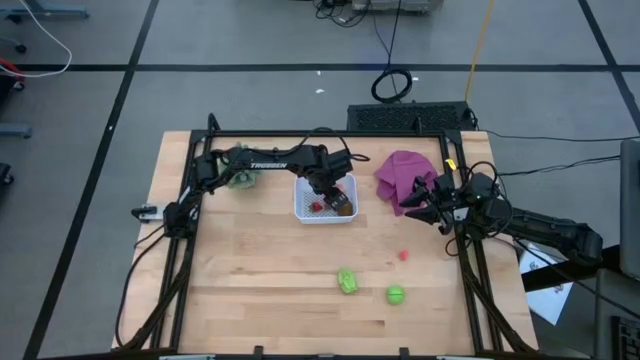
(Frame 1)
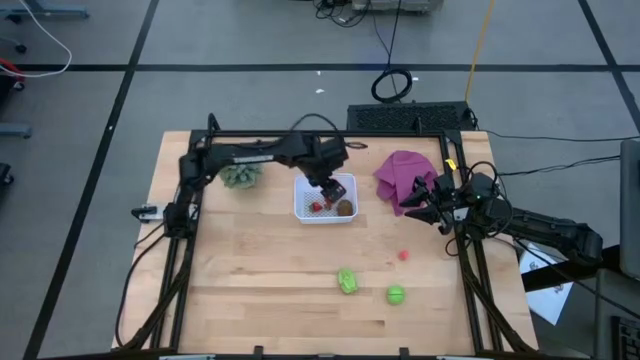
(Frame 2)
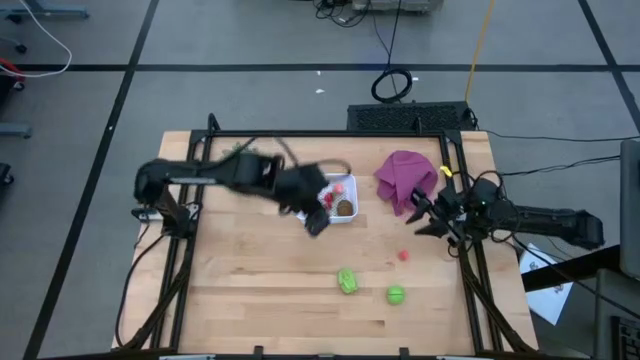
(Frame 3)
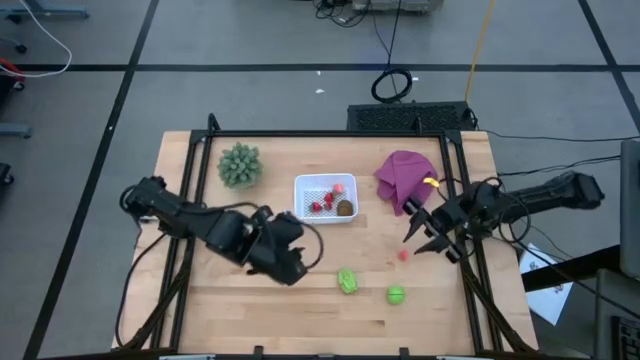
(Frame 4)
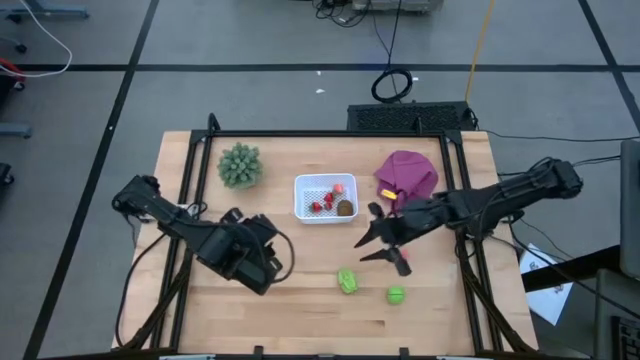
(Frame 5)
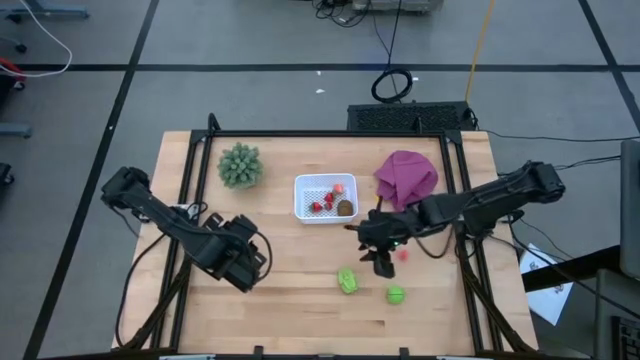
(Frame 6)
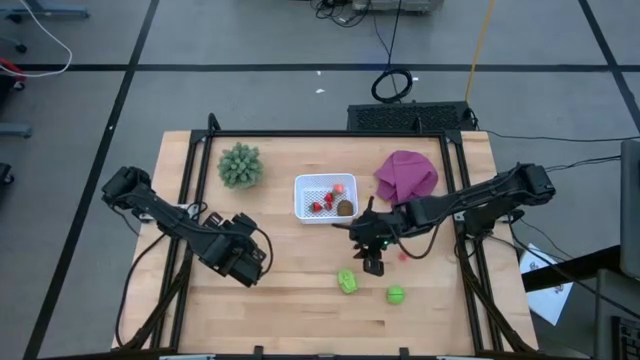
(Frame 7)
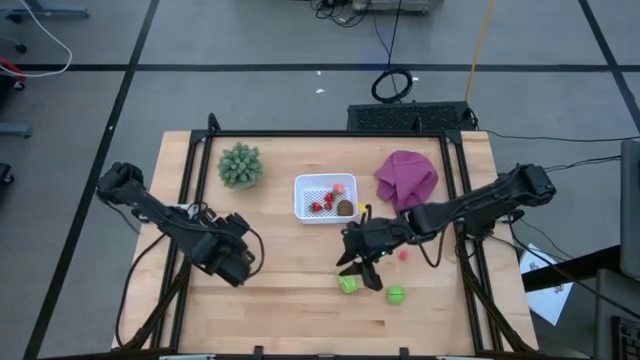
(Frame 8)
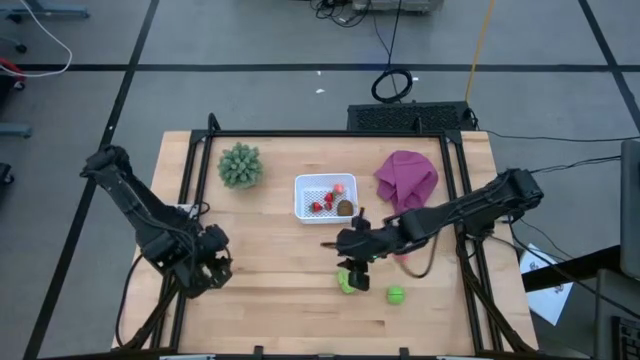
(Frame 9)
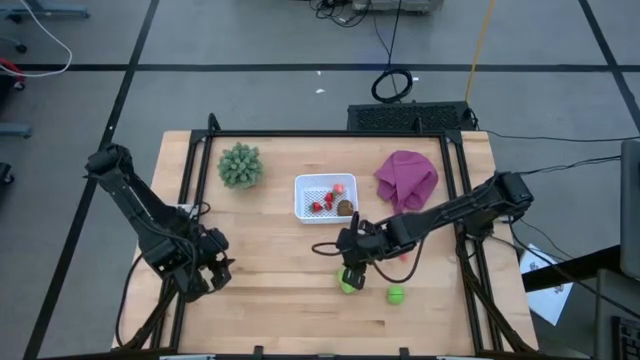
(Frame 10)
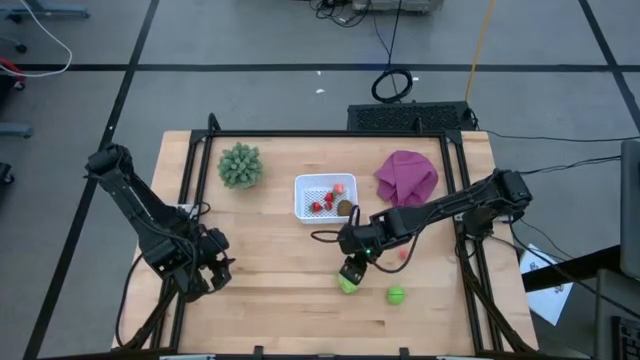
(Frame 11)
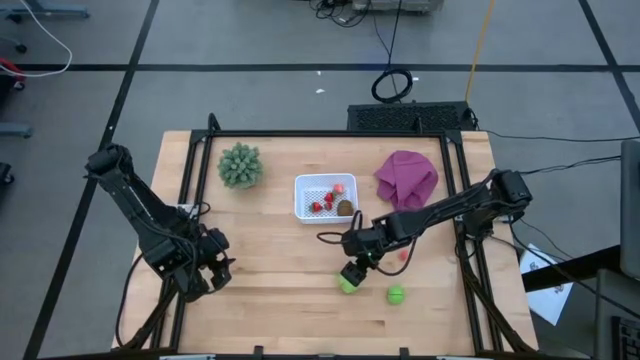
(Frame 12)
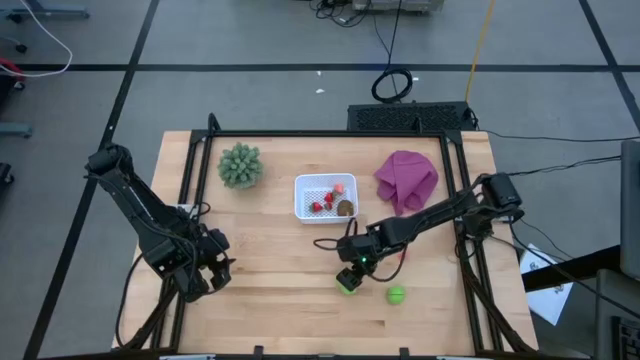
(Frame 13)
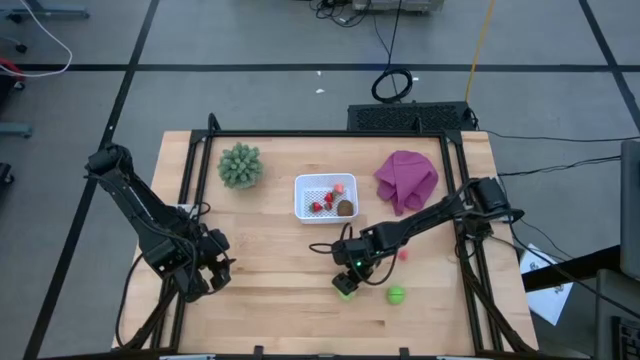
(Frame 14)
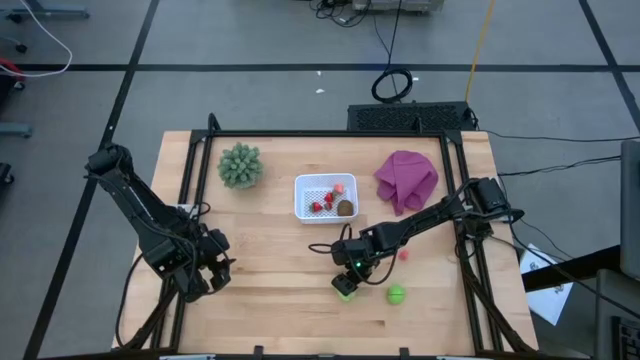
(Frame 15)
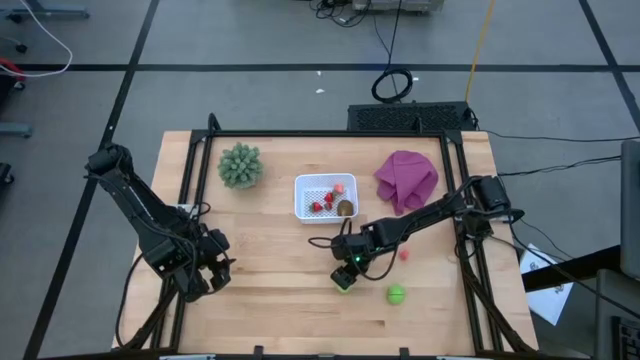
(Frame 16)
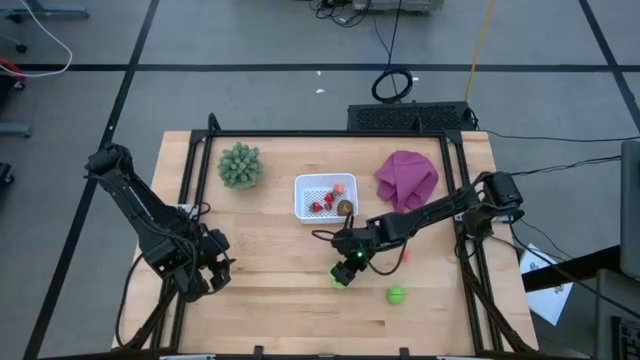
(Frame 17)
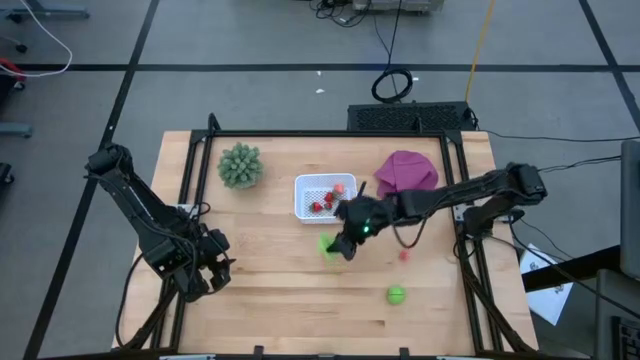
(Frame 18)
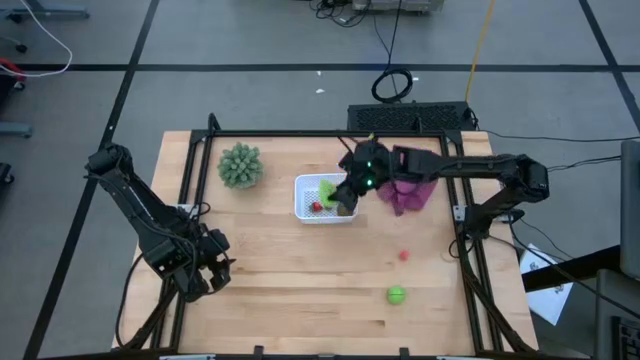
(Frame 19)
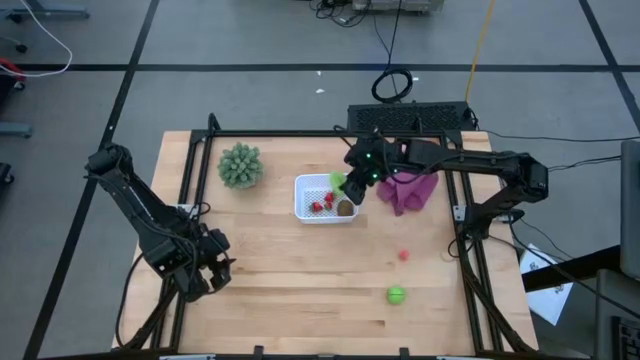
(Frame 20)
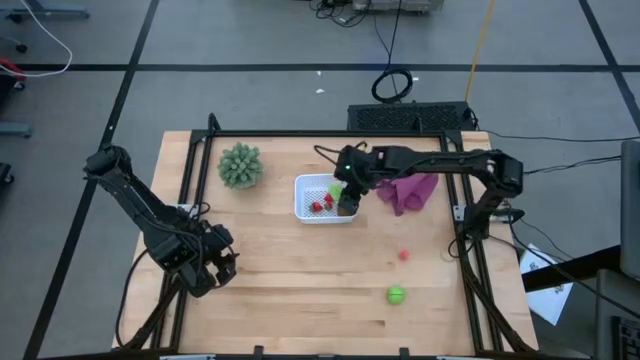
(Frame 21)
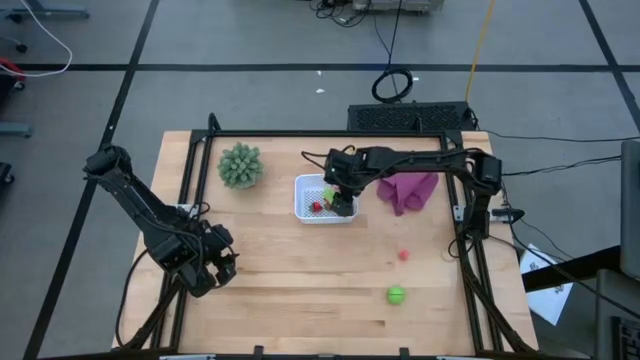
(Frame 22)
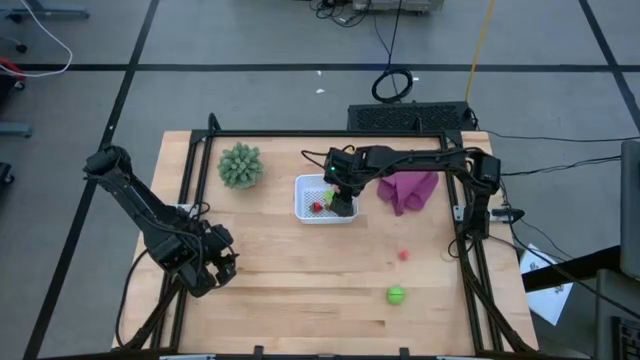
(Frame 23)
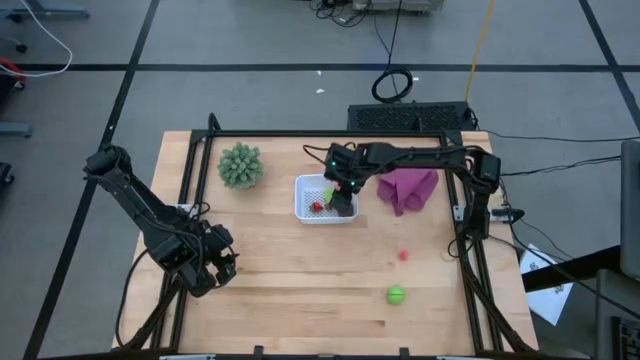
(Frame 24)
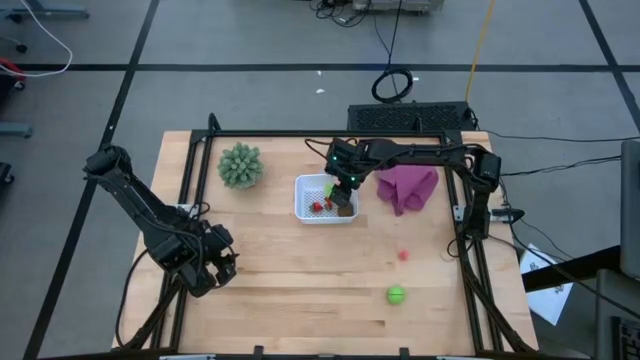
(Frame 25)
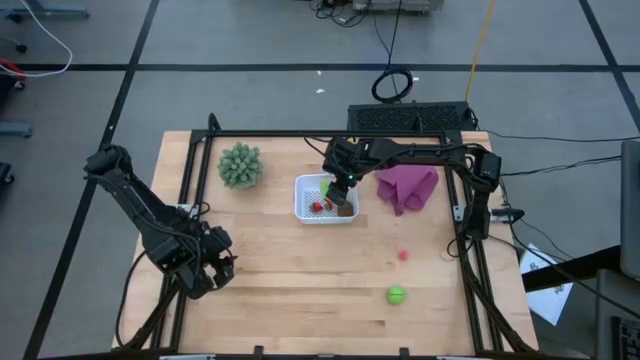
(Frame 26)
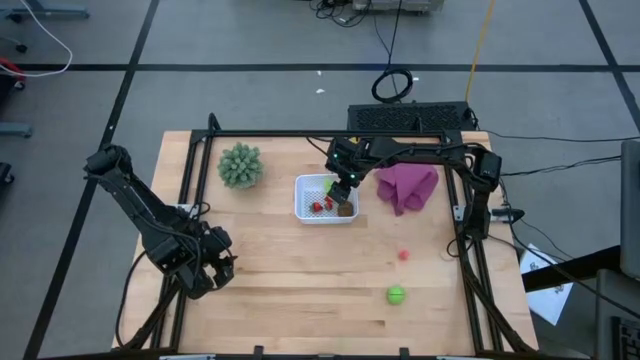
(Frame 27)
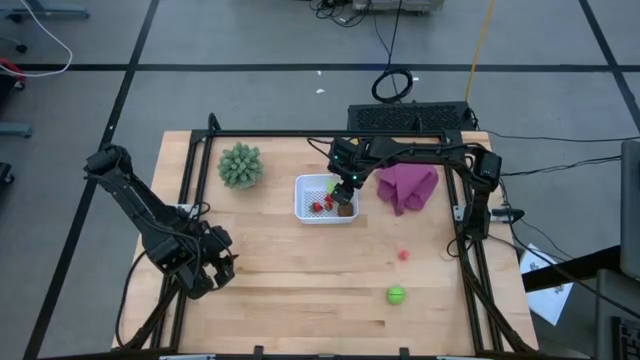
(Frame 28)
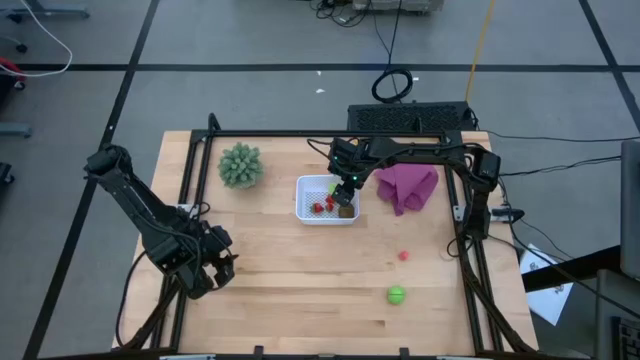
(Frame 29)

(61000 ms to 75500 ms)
Task: Pick and placing Produce into tupperware
Put the green starfruit into the white bin

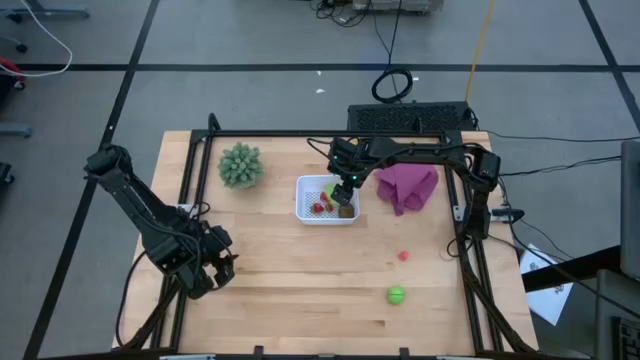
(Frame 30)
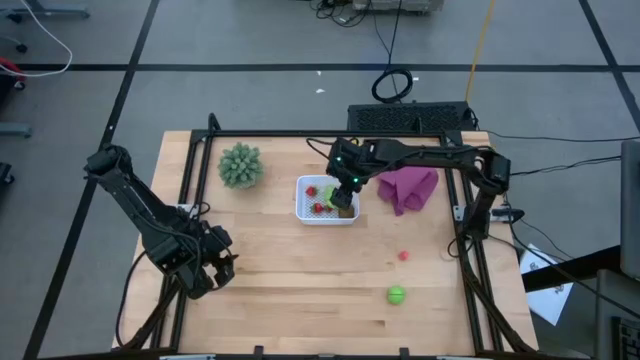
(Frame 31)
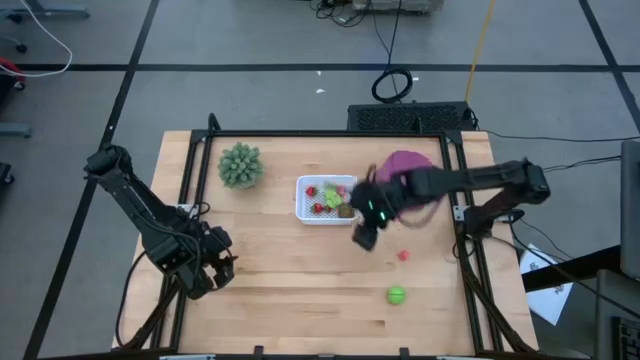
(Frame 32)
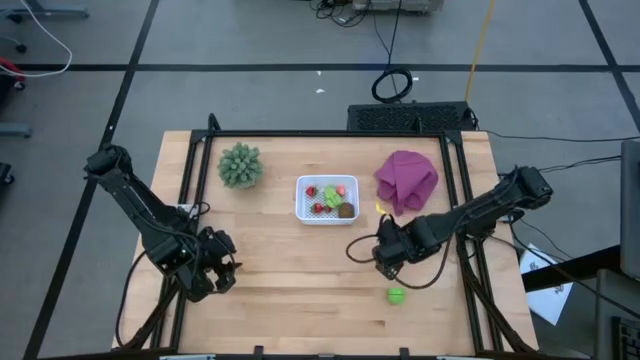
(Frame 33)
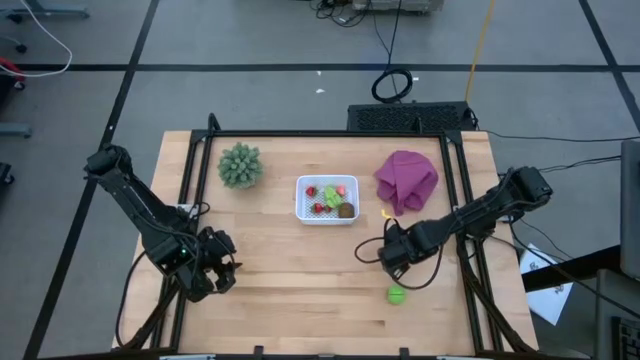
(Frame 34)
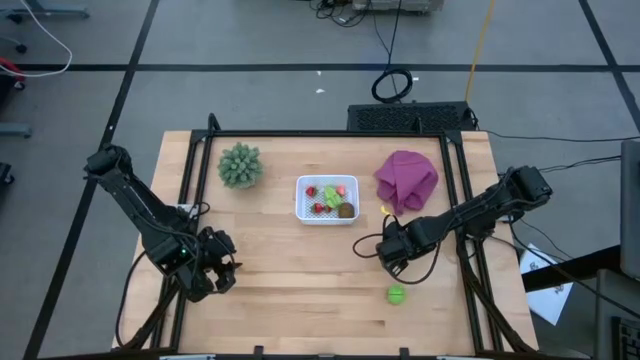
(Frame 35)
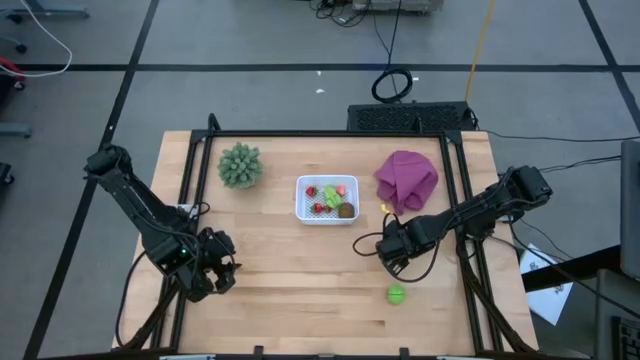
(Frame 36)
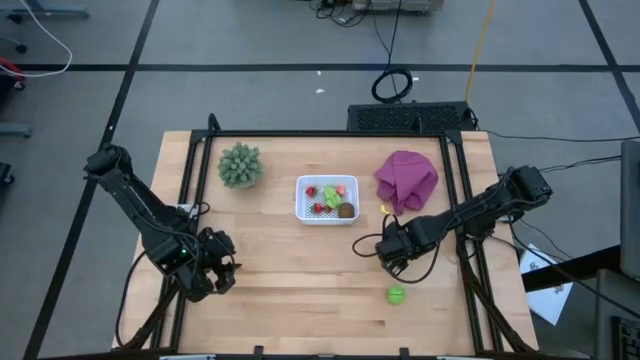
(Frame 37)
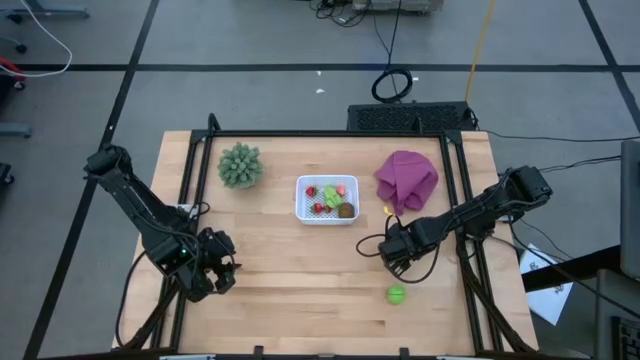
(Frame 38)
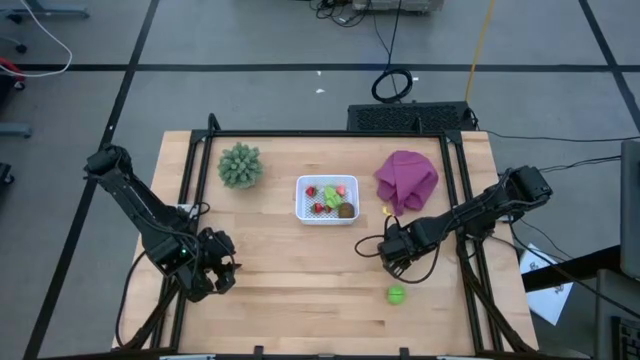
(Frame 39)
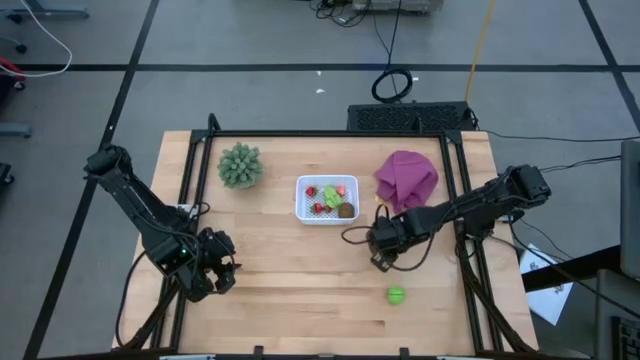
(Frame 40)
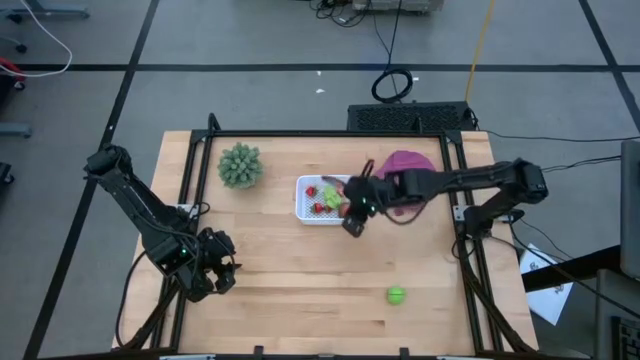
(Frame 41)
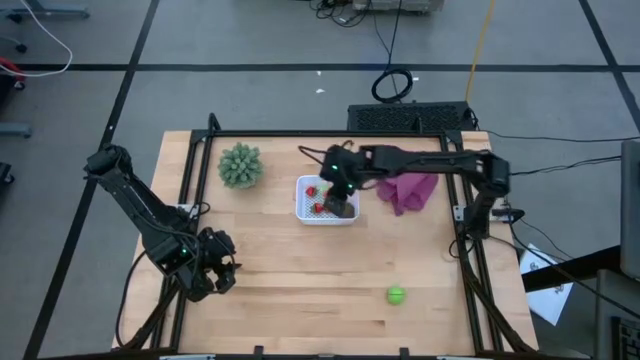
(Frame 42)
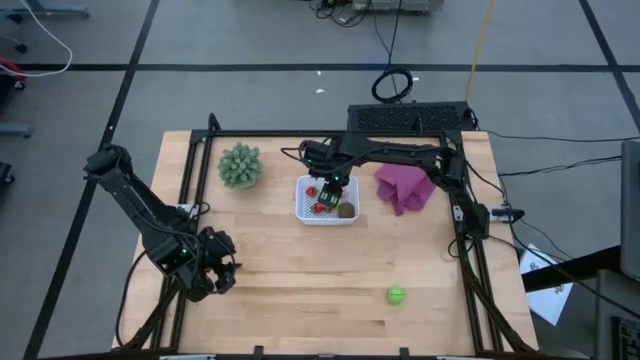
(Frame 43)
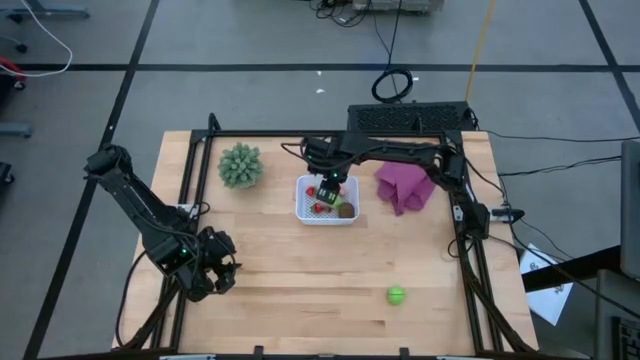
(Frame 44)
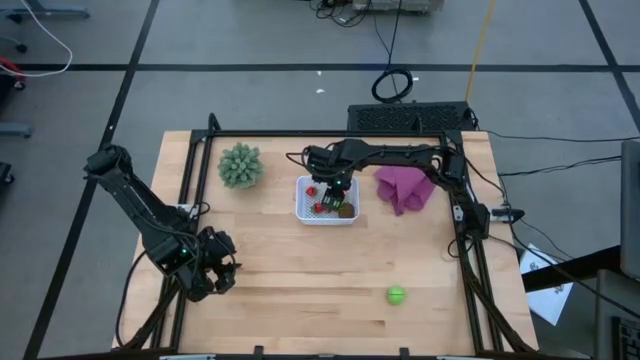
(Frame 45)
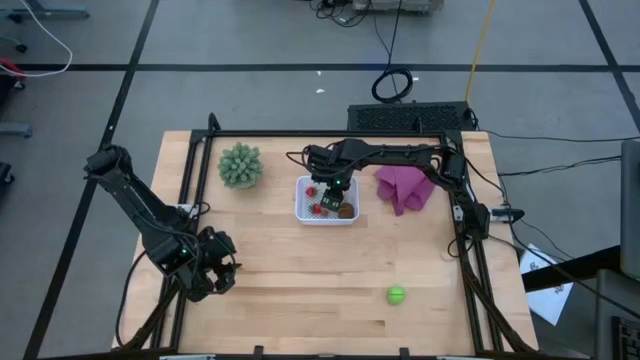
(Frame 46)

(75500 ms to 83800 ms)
Put the pink peach into the white bin
